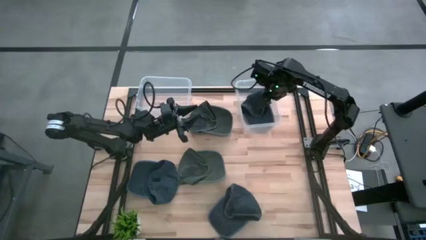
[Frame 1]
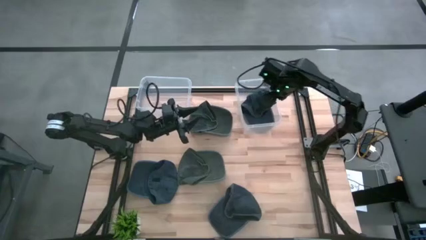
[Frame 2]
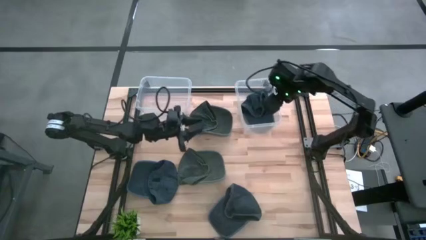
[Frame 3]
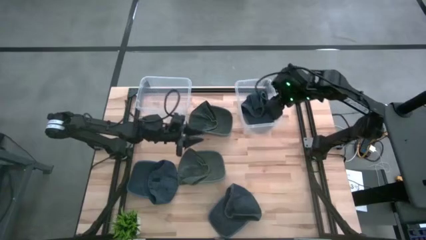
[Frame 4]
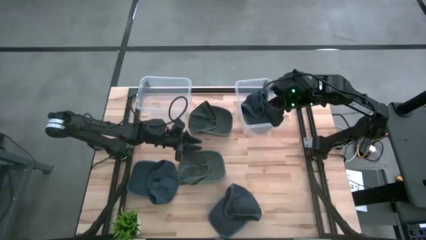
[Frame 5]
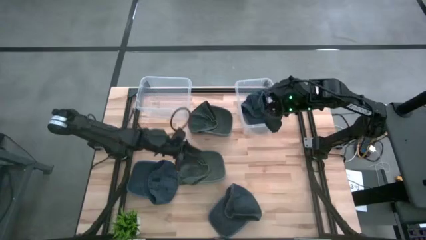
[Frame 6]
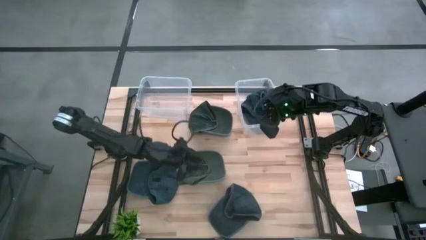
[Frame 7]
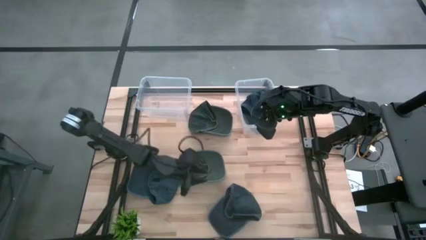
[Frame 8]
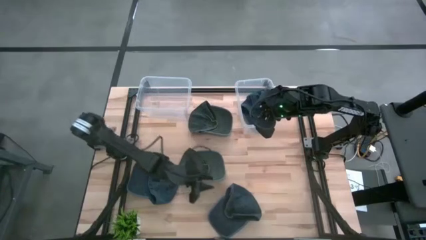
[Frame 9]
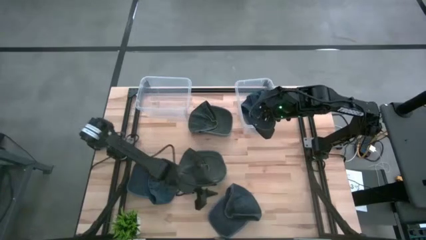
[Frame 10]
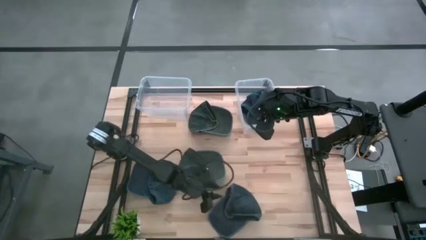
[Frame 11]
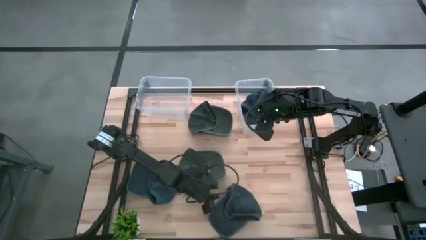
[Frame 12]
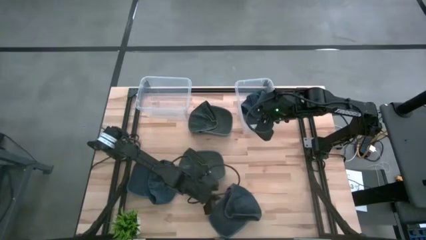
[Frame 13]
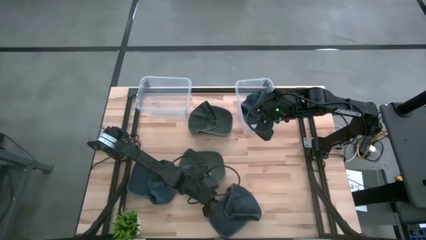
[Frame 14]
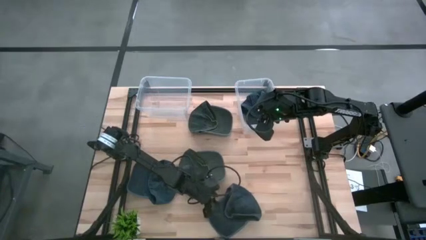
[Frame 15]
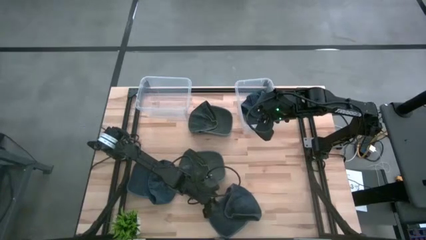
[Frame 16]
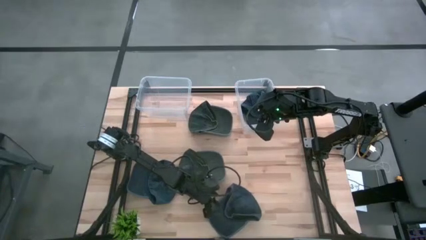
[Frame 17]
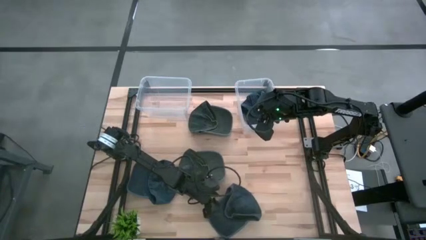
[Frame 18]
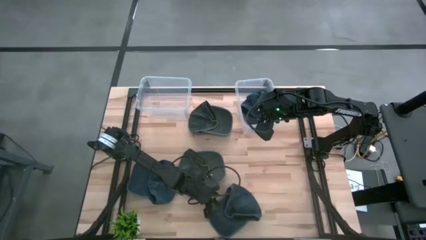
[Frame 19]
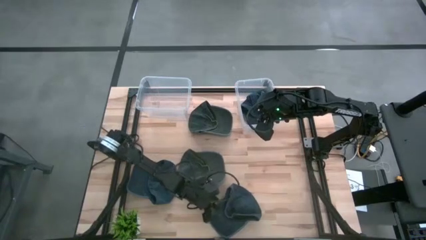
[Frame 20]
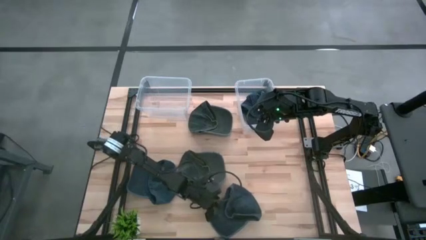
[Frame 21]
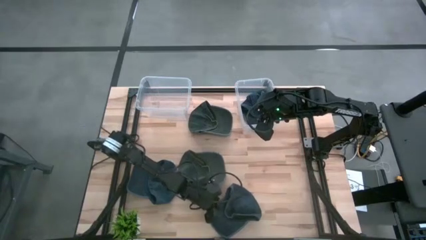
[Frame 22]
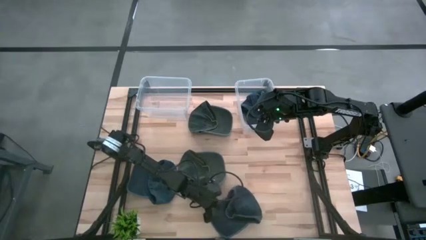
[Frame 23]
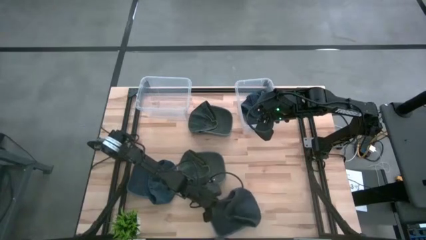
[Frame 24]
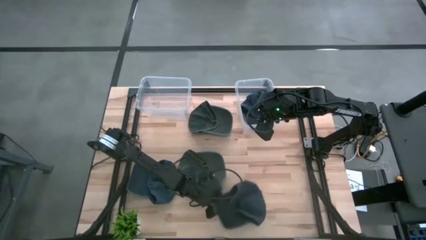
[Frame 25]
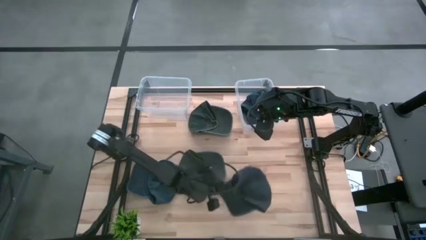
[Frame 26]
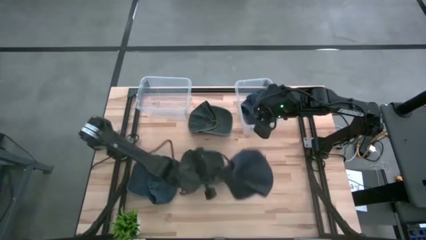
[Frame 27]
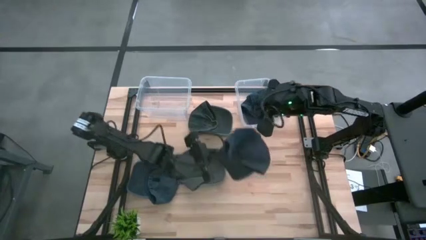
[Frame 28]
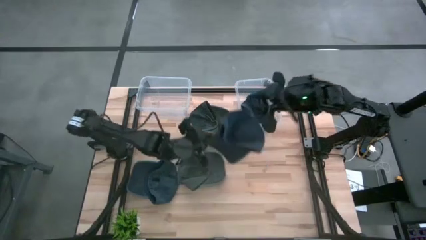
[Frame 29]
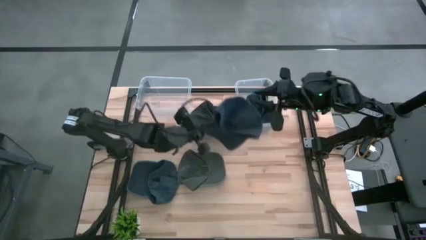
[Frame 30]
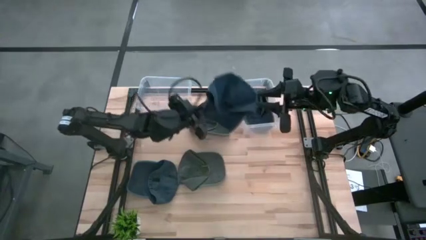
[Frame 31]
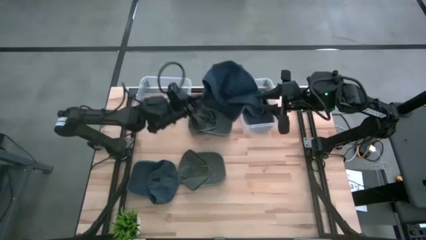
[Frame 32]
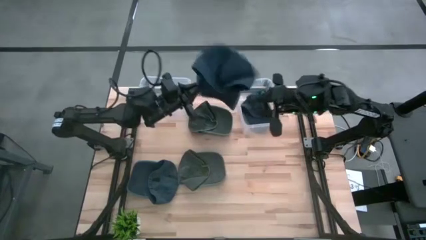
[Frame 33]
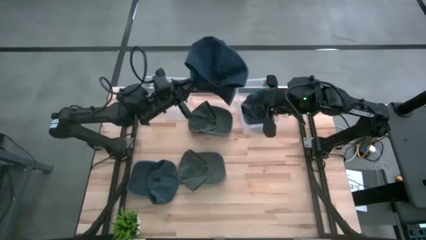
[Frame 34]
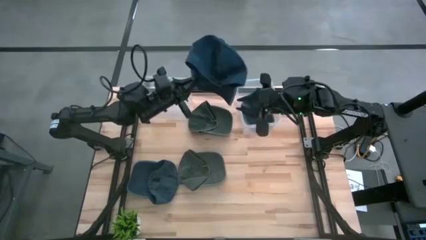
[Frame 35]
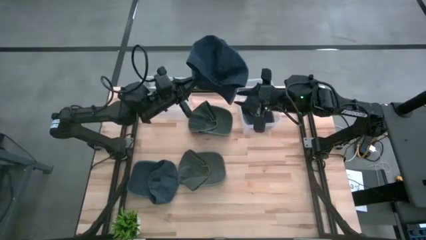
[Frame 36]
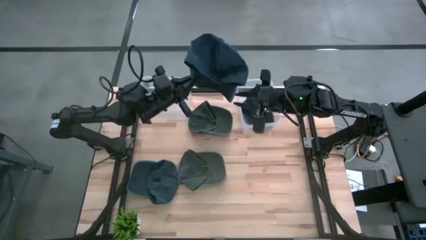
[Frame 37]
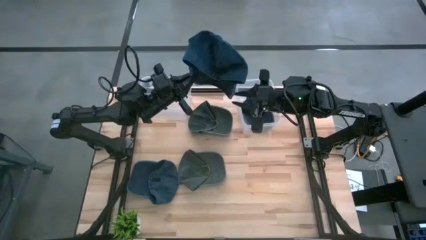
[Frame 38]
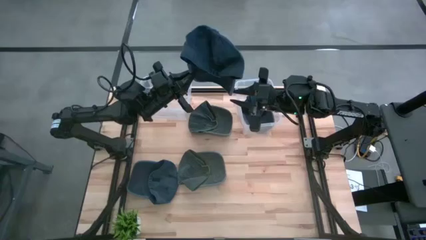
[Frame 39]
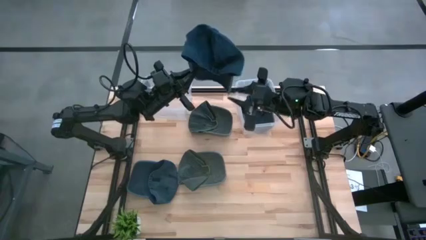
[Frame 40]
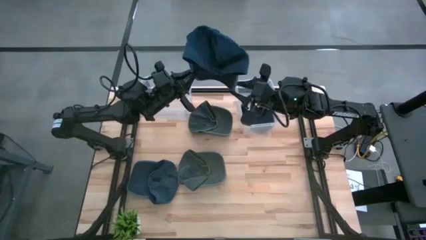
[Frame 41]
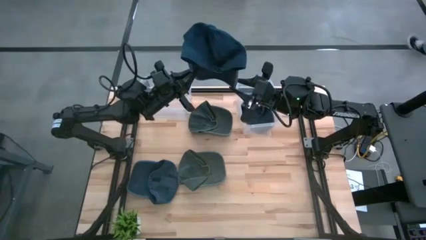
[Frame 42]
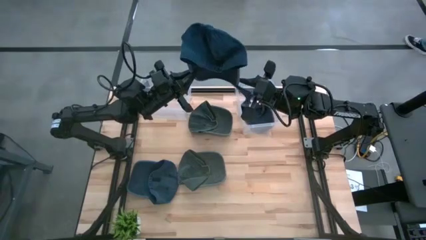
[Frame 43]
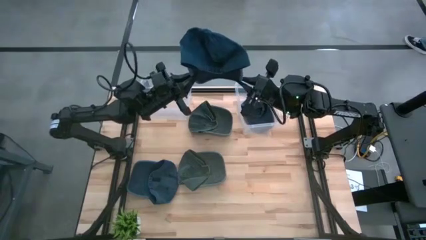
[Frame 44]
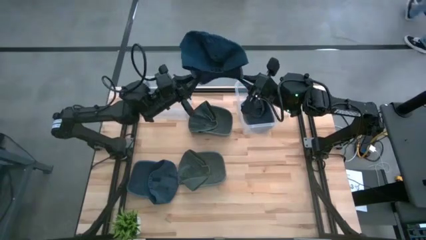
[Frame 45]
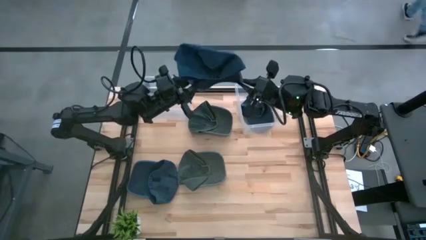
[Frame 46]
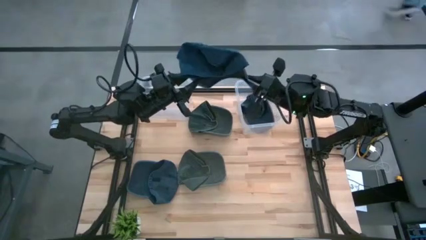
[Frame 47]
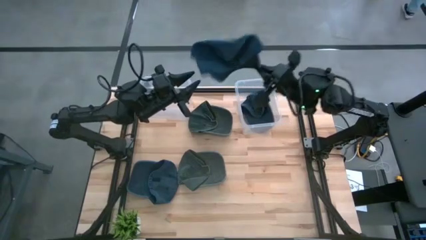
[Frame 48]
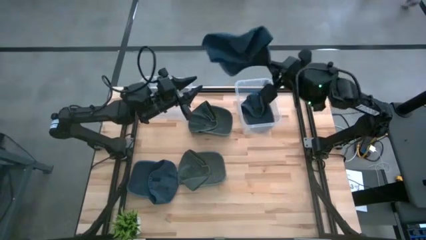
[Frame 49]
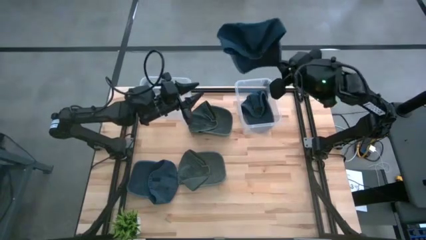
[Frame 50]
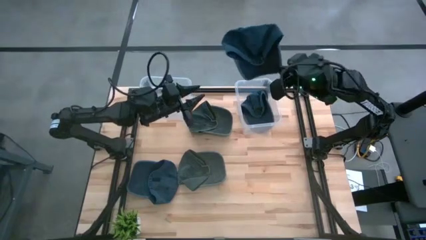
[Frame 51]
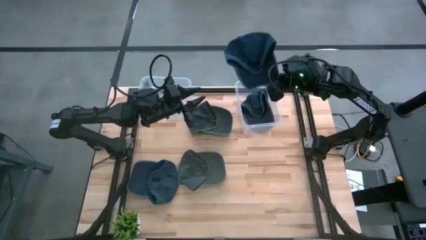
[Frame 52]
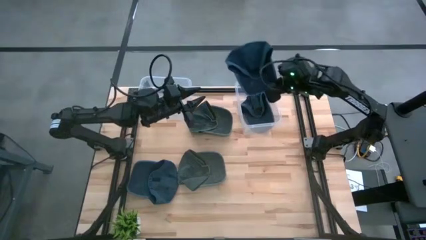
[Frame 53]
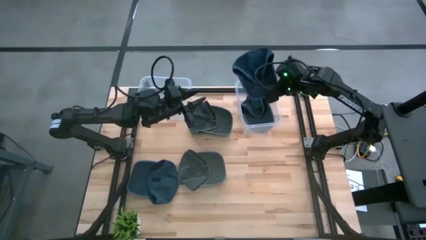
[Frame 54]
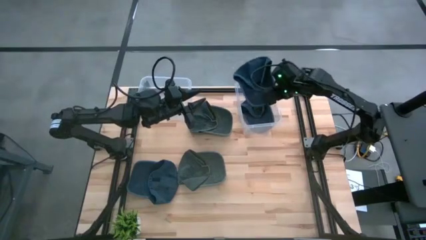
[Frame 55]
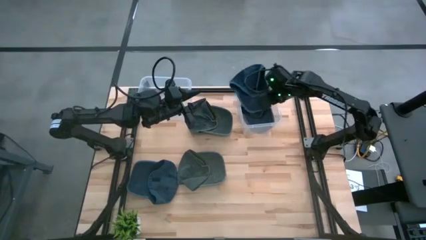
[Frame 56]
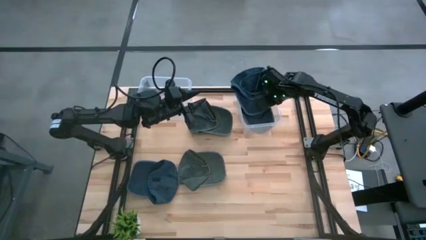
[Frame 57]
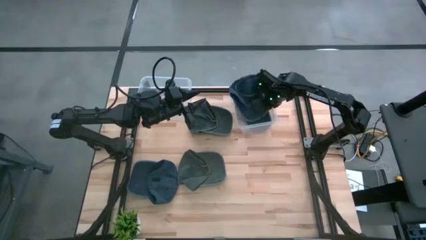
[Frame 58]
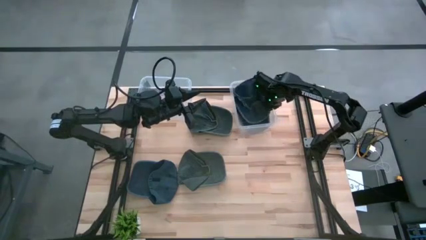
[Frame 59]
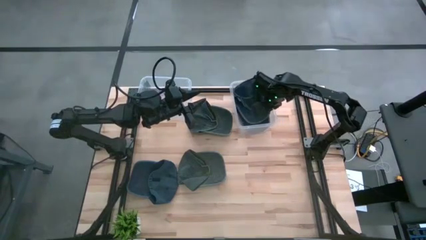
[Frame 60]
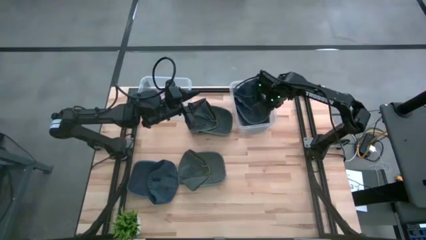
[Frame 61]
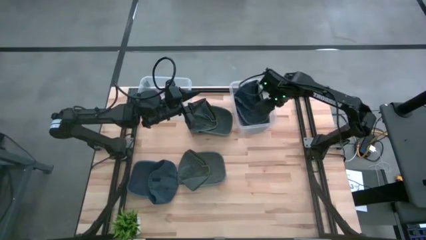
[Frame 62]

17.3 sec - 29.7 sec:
Task: Pick & Place hat
Put the bottom blue cap into the right transparent bin
